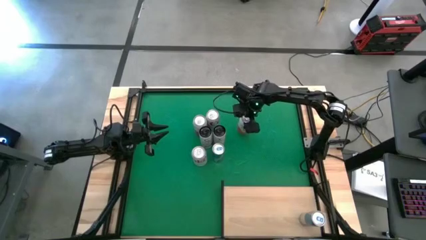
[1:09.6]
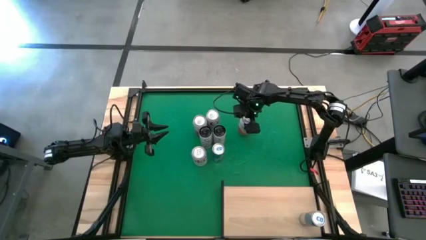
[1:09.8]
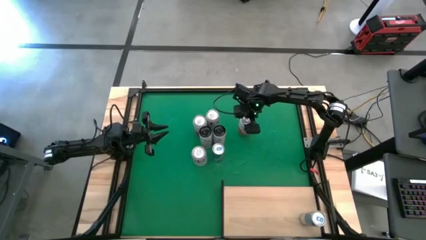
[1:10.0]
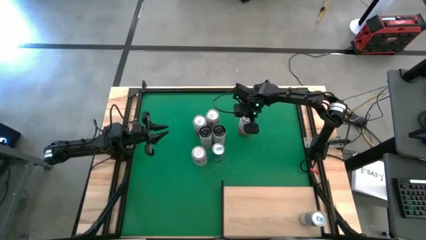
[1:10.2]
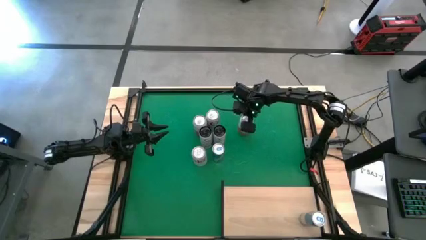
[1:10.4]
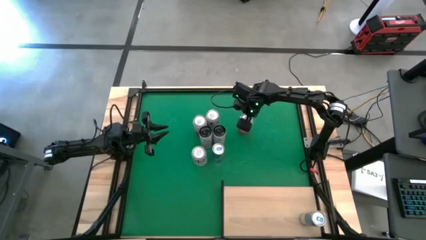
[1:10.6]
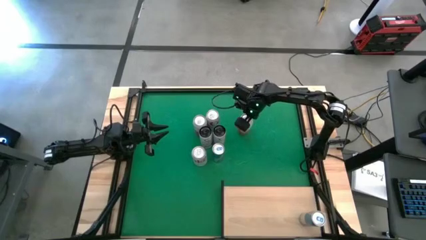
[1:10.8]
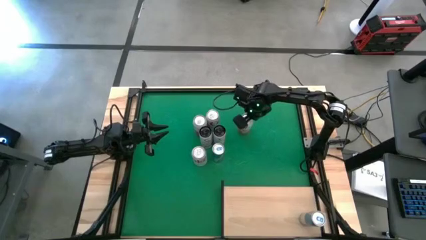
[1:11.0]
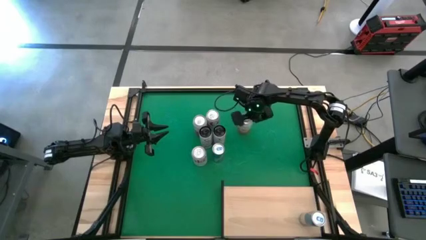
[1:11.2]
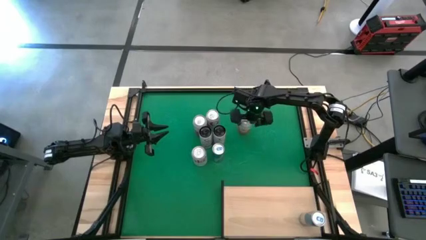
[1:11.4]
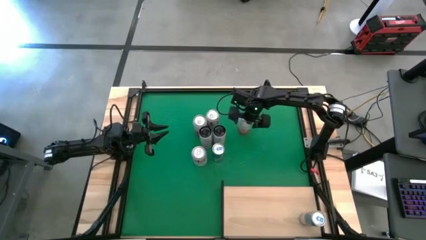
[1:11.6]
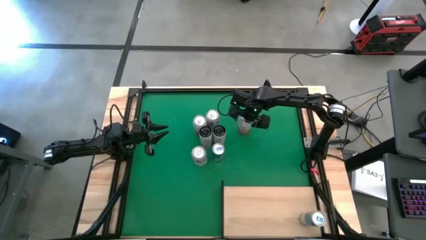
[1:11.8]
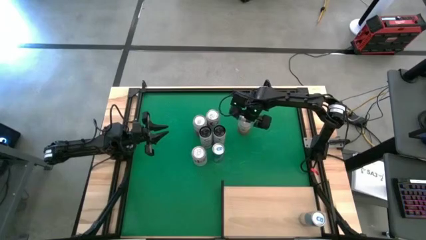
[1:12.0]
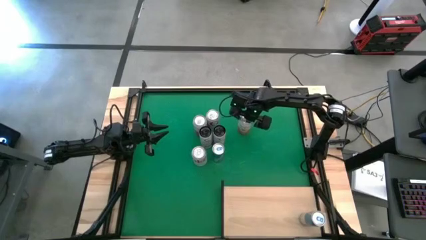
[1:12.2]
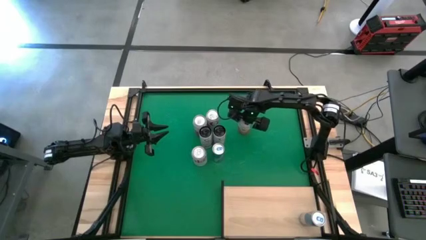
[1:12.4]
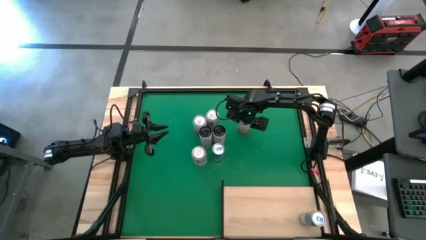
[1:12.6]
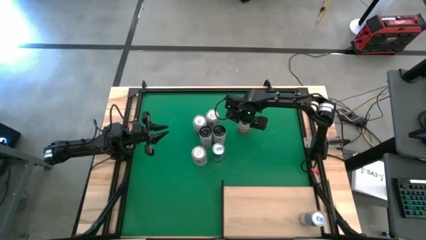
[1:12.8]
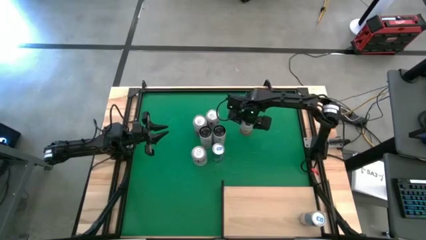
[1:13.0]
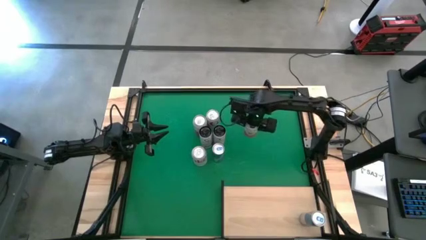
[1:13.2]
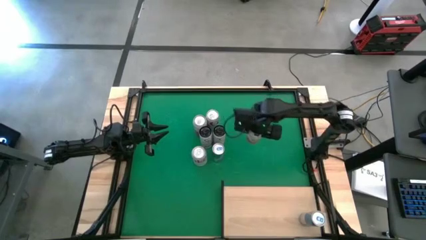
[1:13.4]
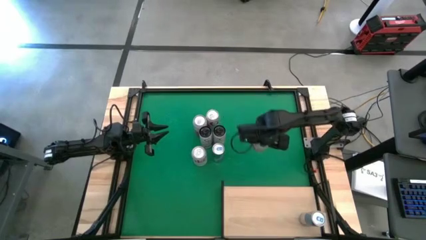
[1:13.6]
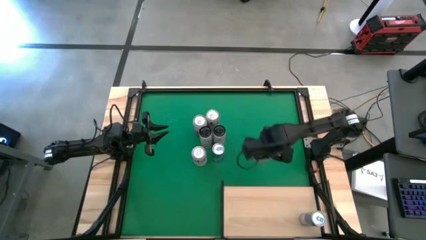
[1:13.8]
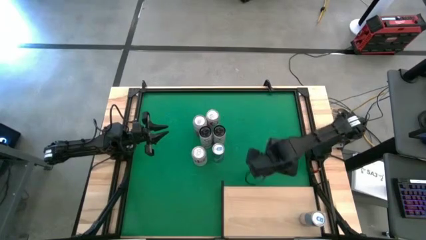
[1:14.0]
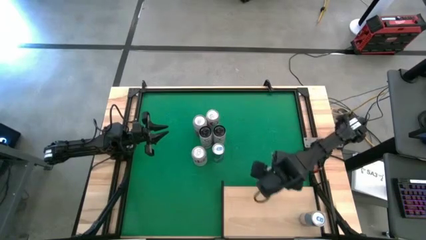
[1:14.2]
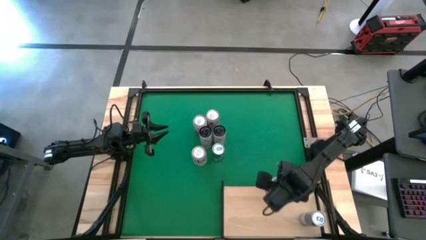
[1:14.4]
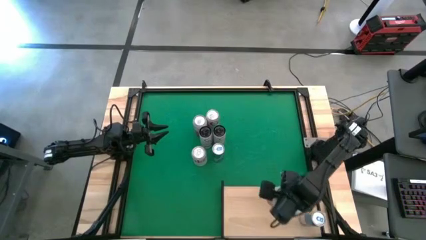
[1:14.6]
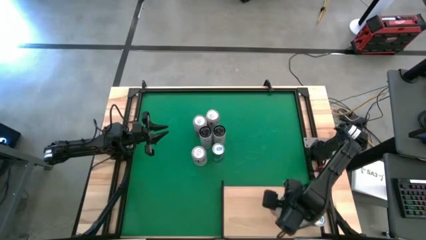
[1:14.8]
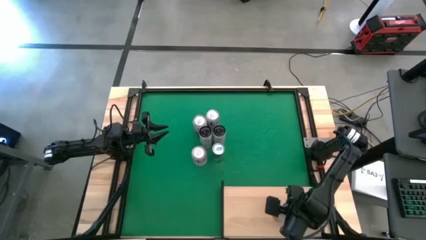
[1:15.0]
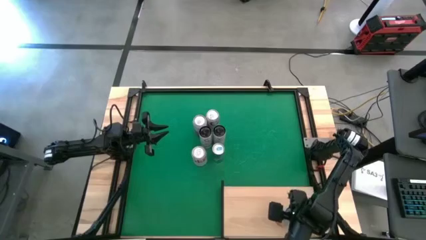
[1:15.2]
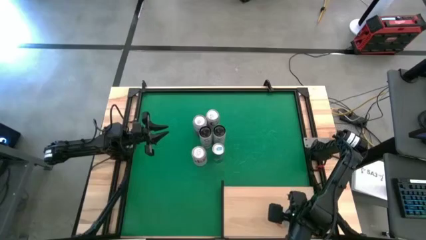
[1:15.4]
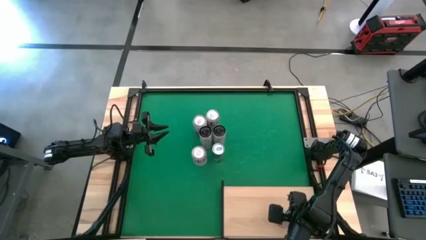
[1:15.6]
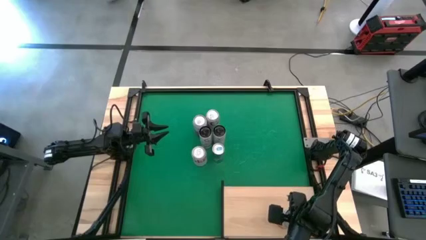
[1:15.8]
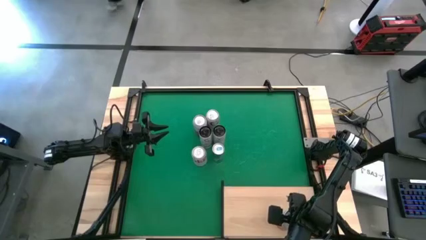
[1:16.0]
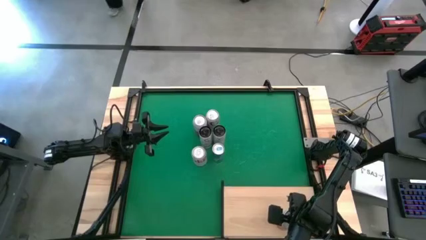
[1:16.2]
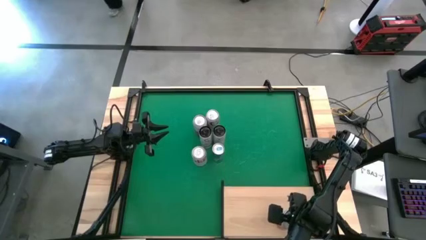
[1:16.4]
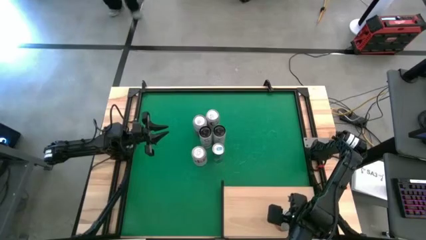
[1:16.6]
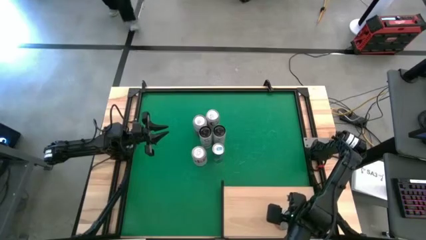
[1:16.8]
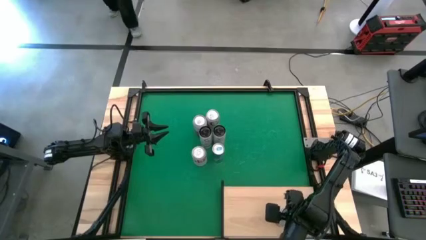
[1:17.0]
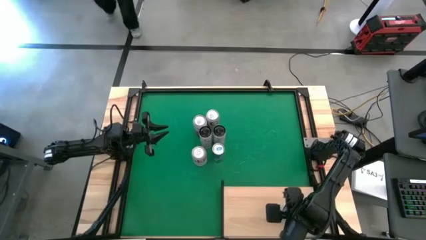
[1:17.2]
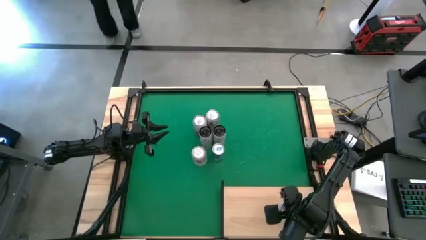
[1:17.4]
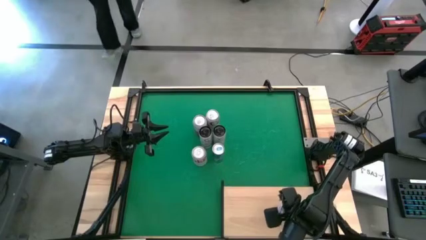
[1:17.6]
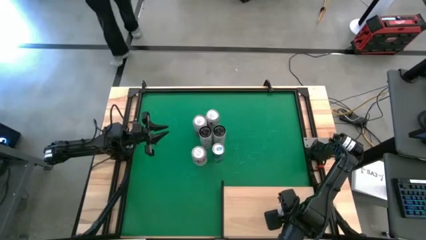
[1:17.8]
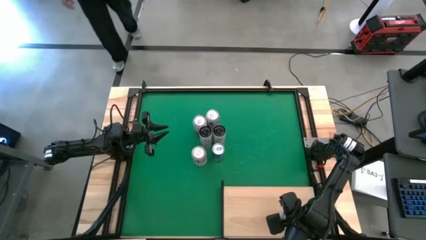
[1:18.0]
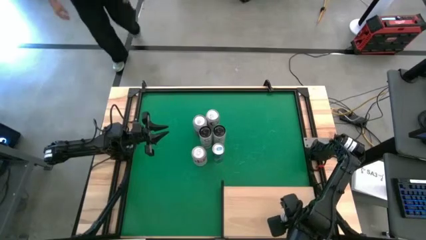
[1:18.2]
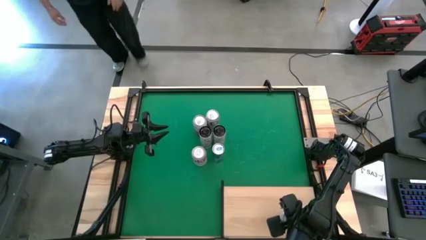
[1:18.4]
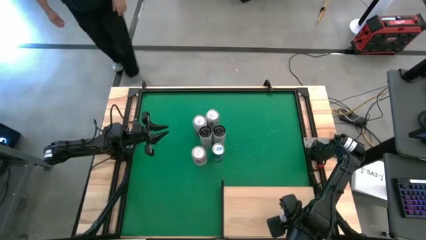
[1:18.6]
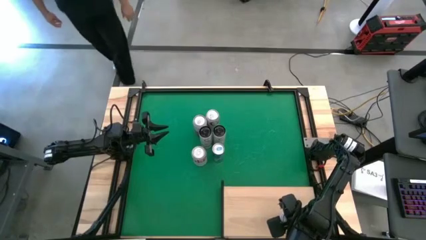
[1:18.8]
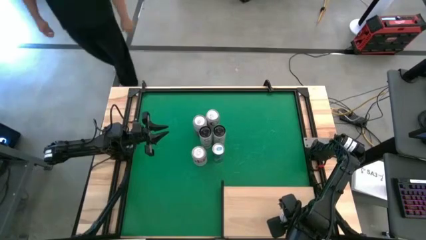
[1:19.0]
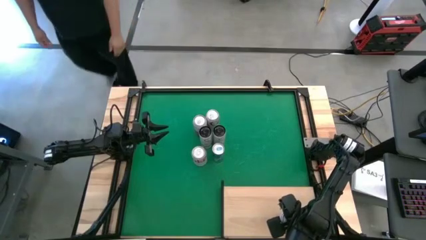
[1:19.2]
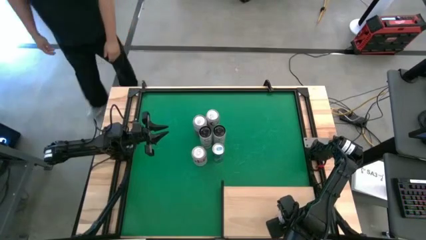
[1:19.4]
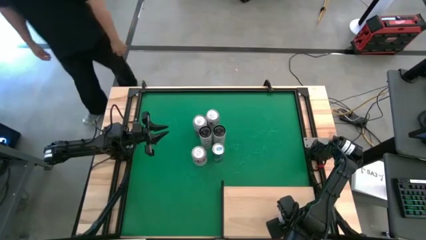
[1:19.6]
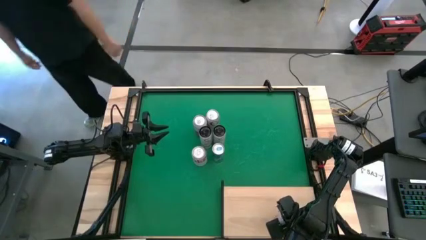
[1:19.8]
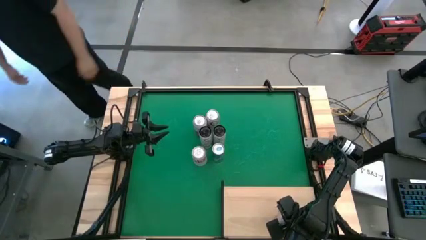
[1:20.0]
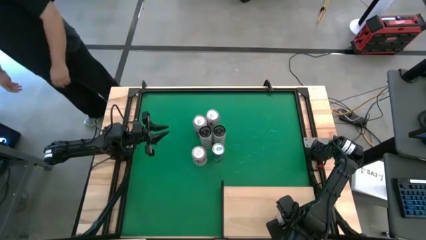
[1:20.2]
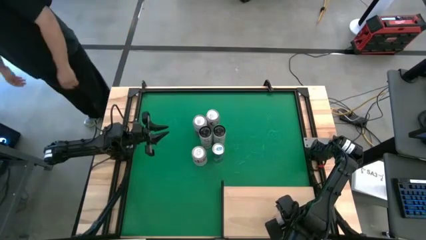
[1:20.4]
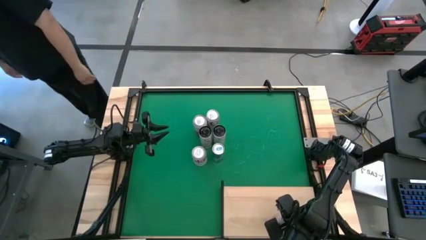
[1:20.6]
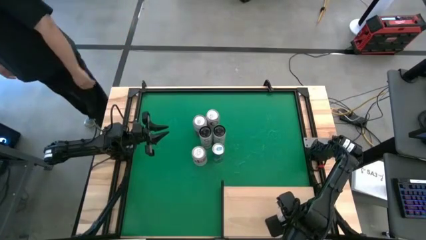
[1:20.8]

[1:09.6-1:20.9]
Task: Place canned beverage on shelf
Put the right pink white soda can on the shelf

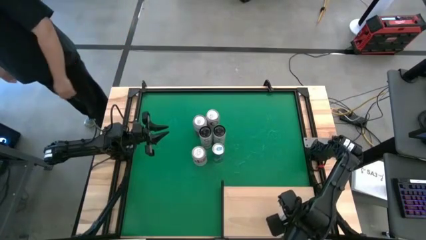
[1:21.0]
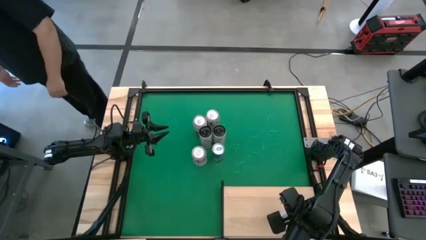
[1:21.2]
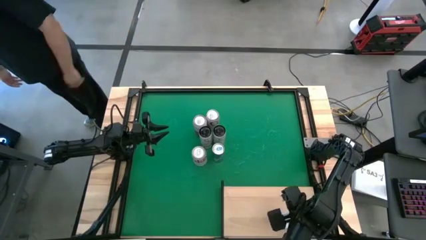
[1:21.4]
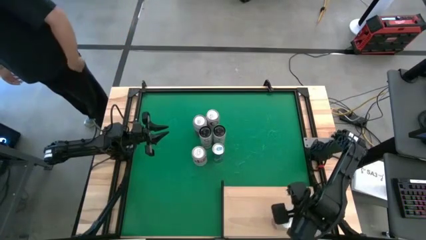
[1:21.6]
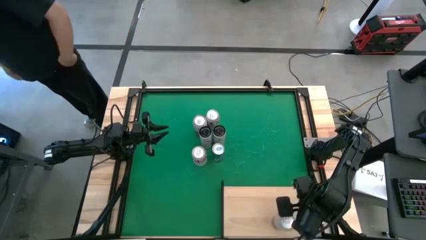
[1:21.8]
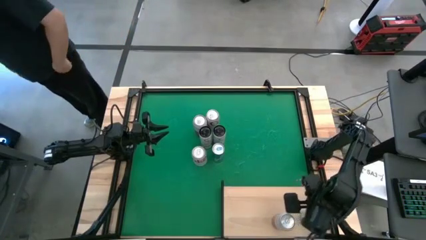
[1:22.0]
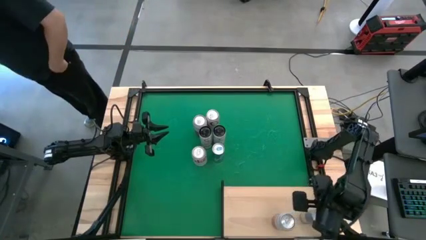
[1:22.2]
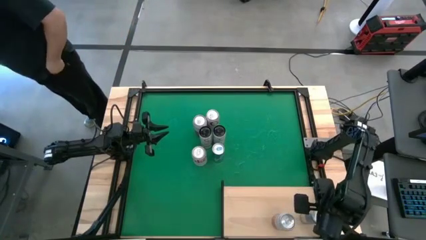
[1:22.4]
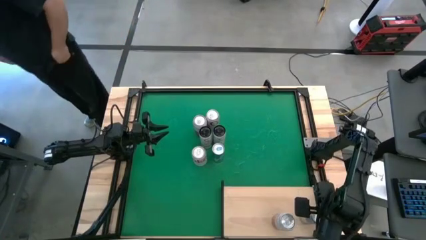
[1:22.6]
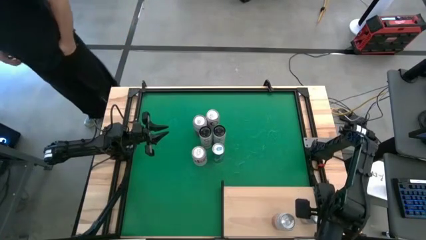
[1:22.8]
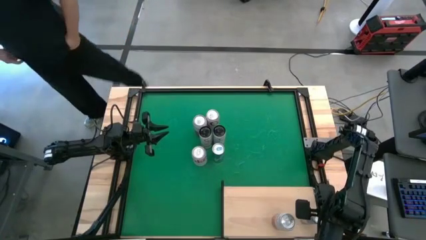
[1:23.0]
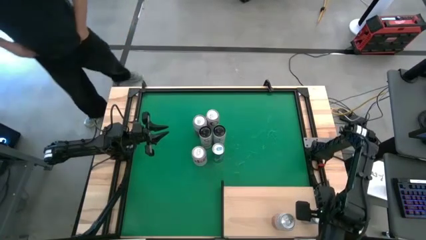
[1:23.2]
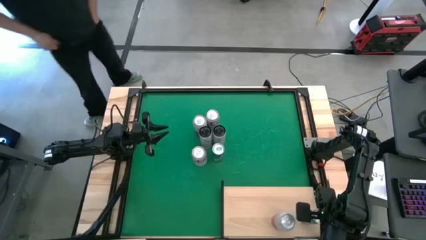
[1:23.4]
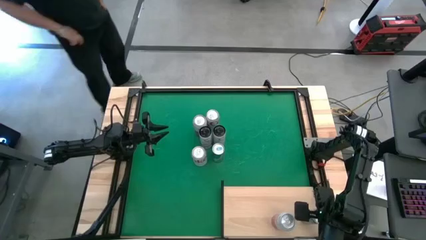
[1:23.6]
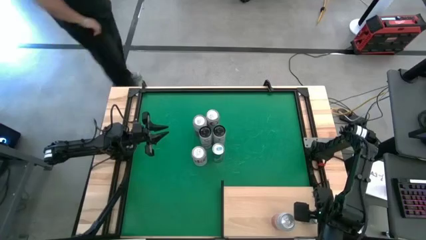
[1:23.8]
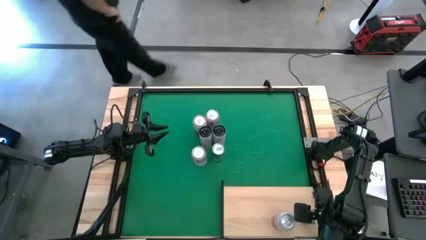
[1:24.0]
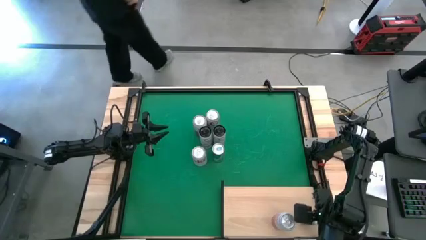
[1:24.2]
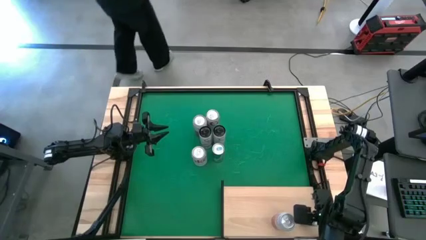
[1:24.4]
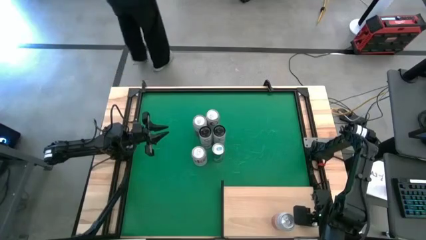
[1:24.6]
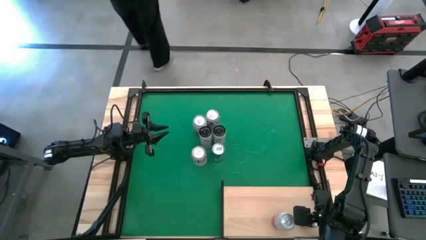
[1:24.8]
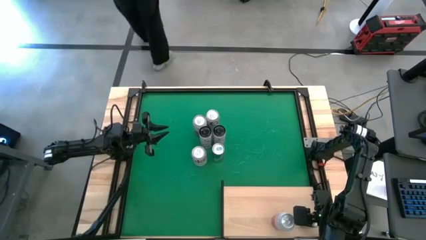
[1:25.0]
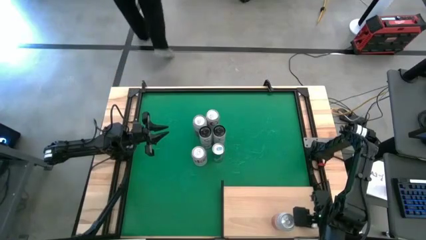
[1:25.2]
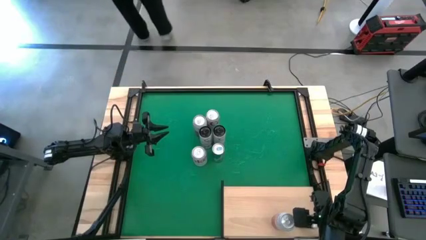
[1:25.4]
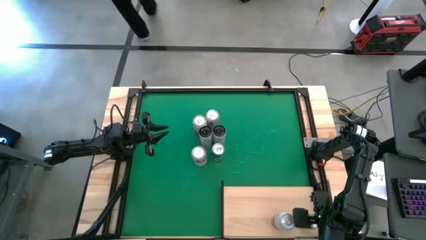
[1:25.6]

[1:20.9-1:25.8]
Adjust the blue soda can on the shelf
